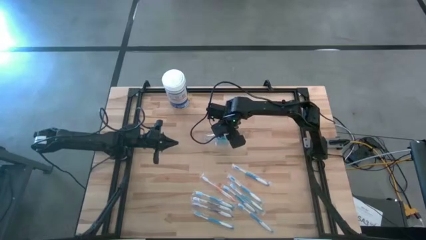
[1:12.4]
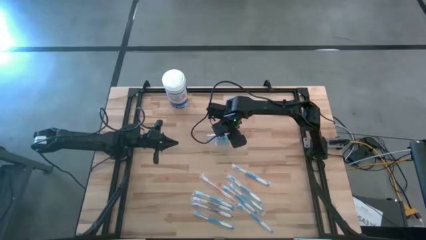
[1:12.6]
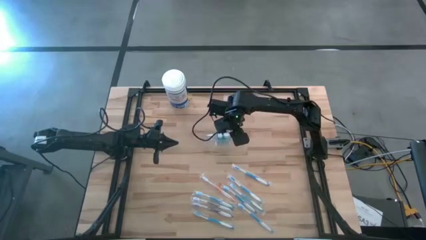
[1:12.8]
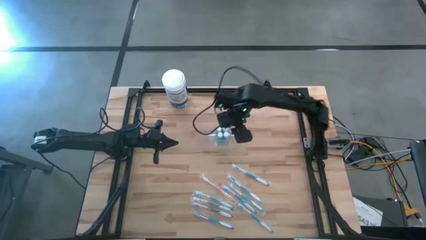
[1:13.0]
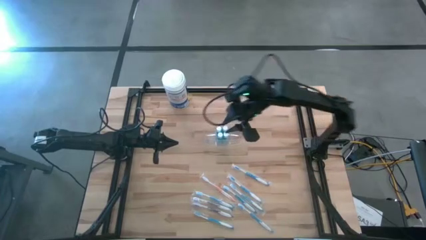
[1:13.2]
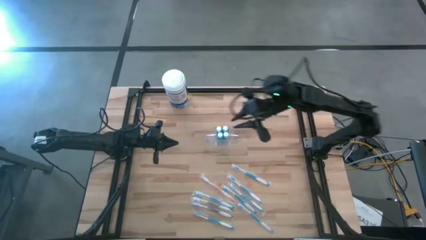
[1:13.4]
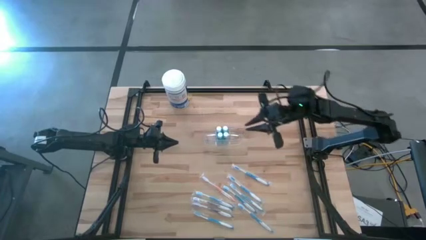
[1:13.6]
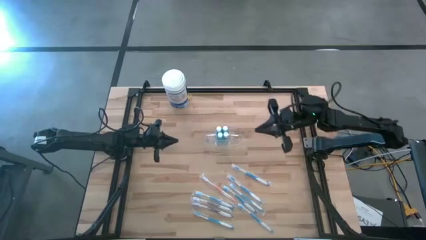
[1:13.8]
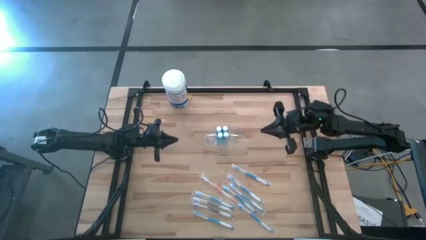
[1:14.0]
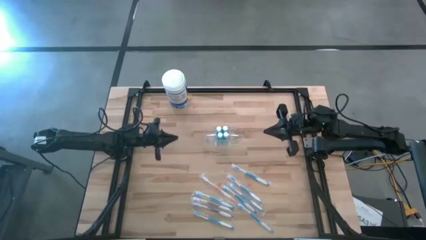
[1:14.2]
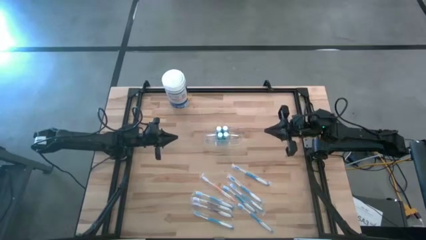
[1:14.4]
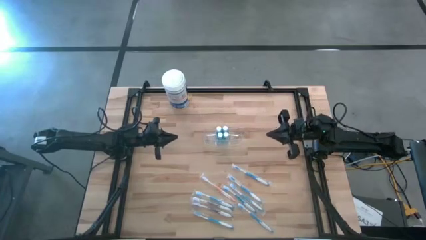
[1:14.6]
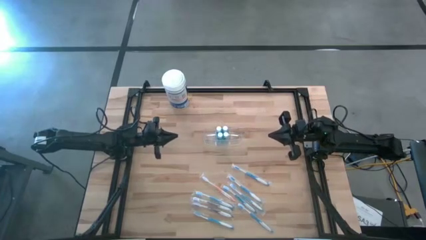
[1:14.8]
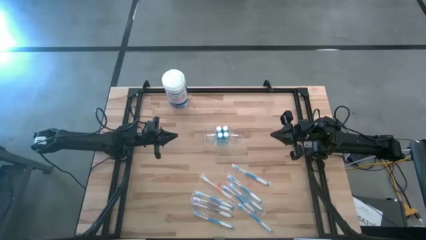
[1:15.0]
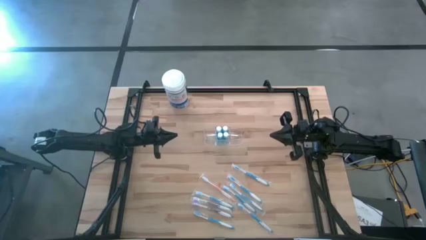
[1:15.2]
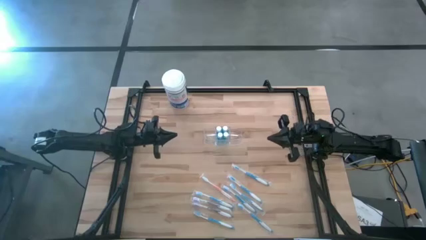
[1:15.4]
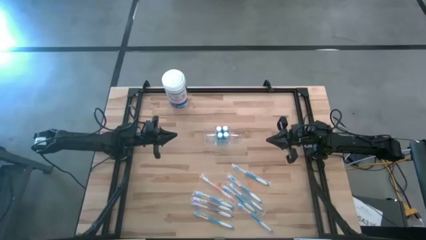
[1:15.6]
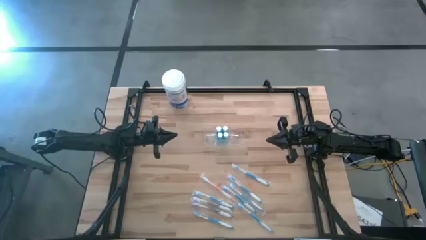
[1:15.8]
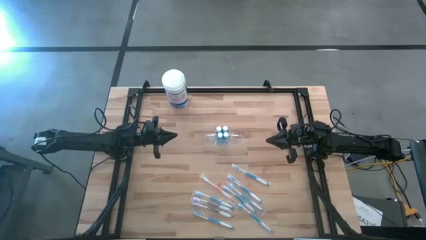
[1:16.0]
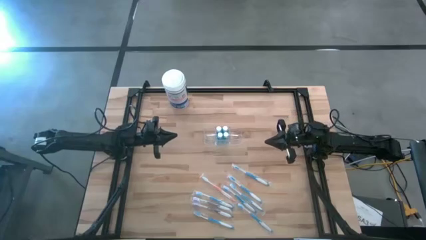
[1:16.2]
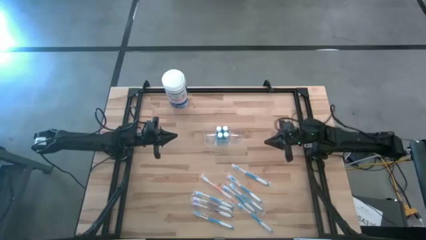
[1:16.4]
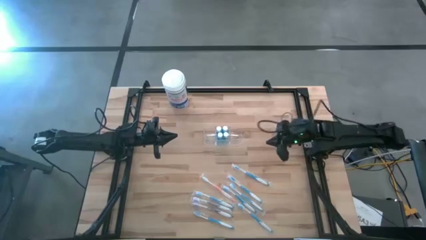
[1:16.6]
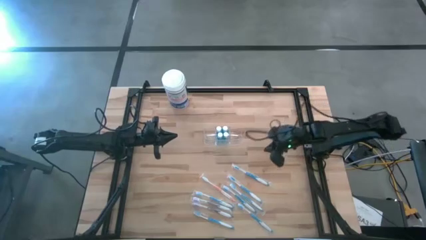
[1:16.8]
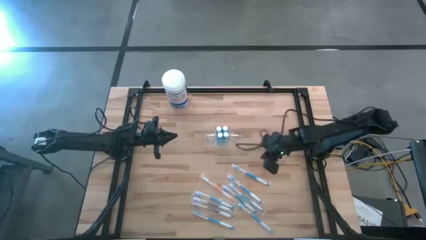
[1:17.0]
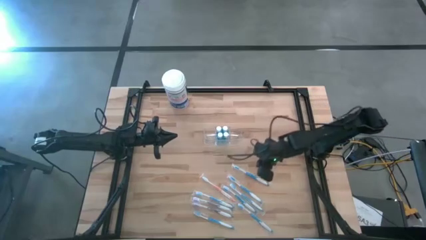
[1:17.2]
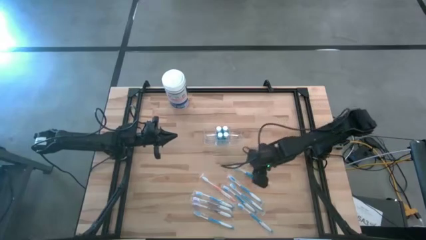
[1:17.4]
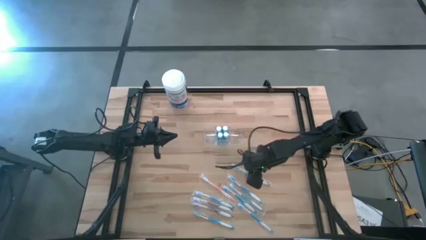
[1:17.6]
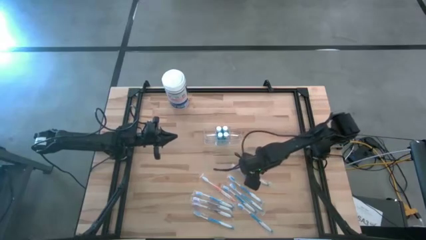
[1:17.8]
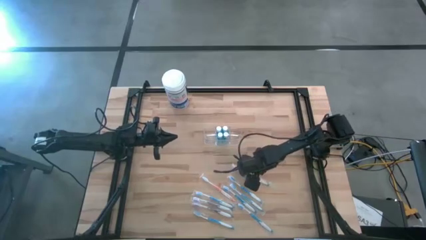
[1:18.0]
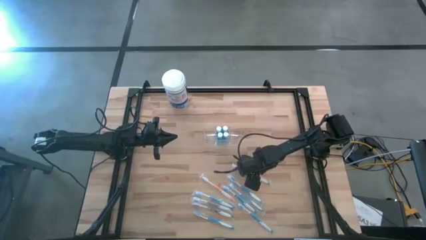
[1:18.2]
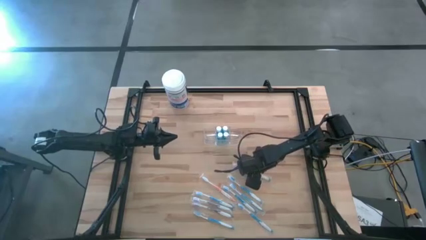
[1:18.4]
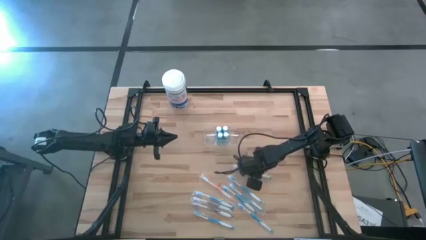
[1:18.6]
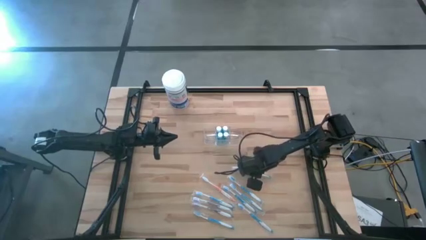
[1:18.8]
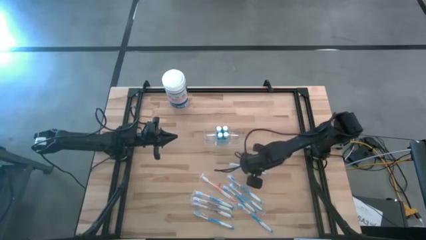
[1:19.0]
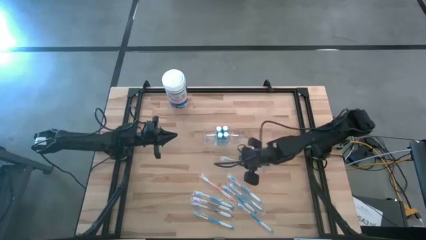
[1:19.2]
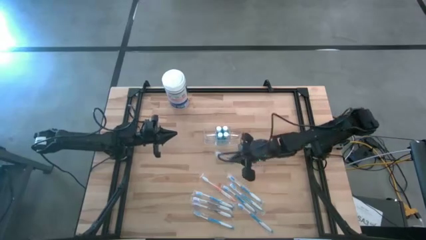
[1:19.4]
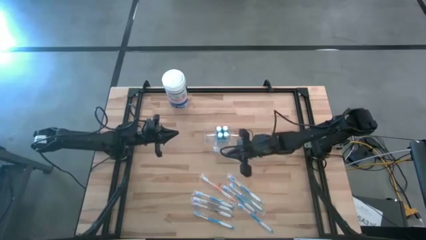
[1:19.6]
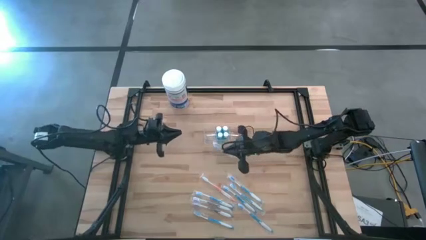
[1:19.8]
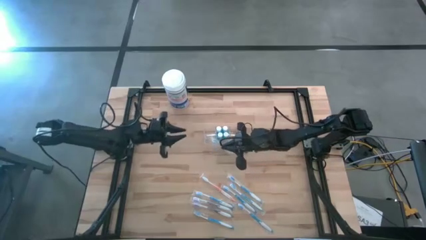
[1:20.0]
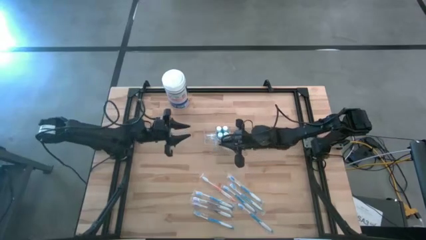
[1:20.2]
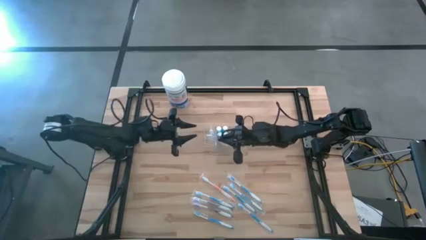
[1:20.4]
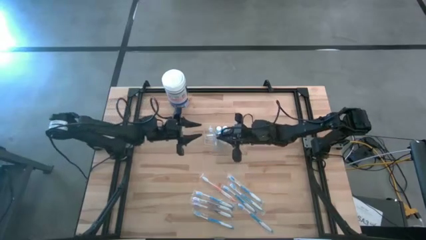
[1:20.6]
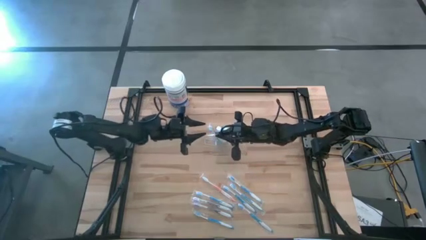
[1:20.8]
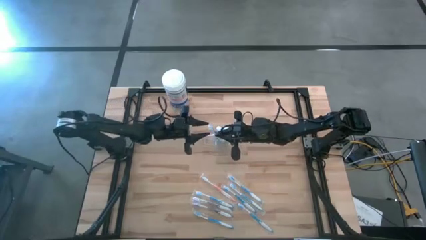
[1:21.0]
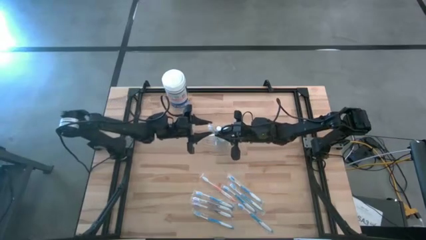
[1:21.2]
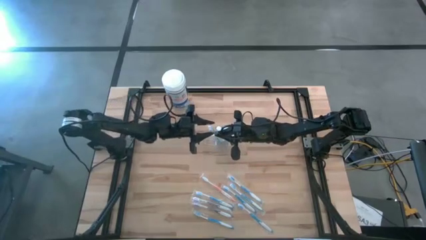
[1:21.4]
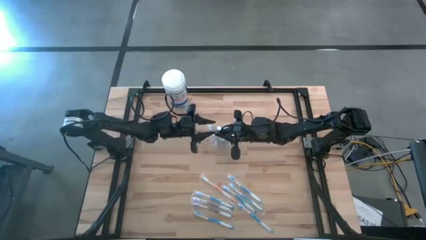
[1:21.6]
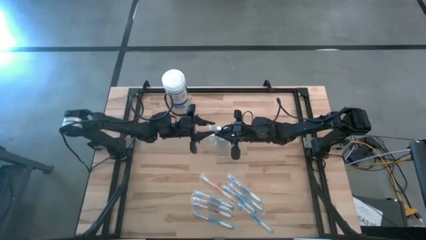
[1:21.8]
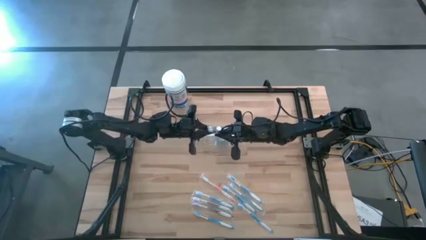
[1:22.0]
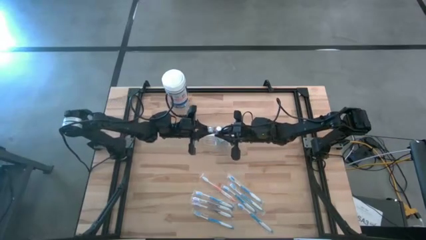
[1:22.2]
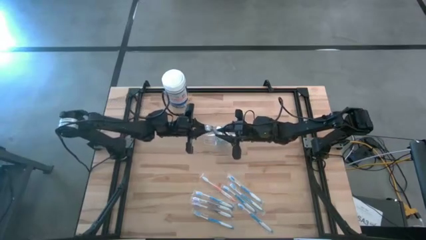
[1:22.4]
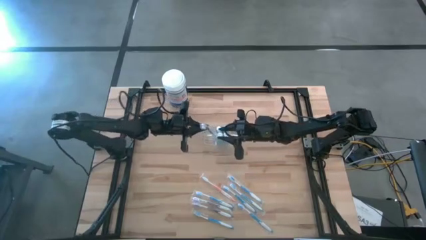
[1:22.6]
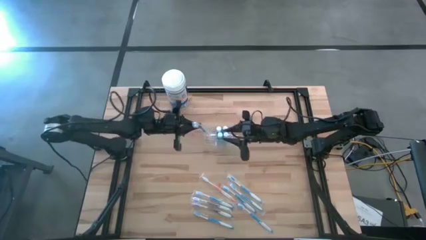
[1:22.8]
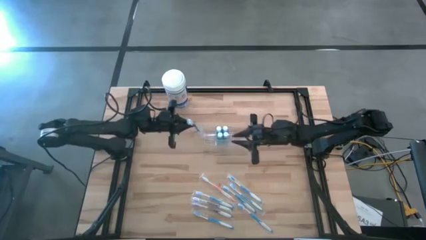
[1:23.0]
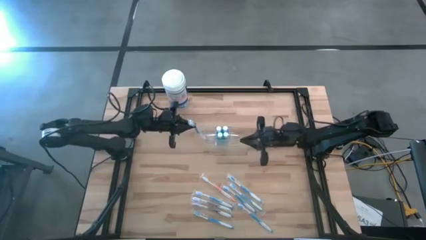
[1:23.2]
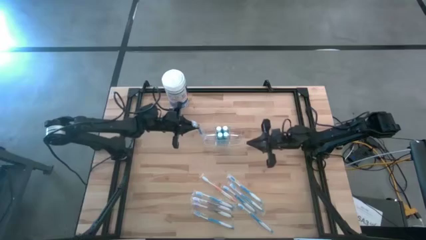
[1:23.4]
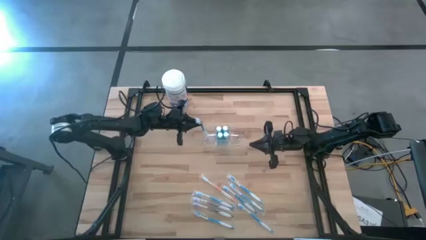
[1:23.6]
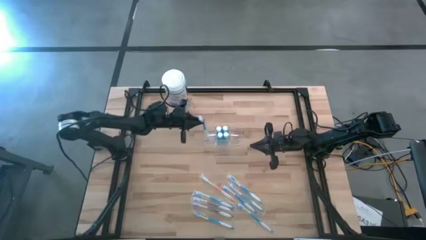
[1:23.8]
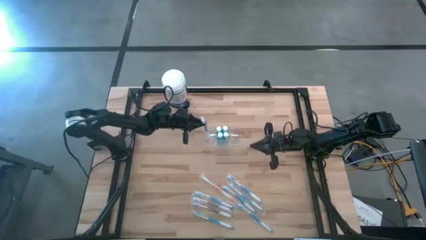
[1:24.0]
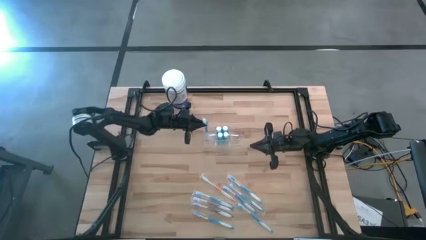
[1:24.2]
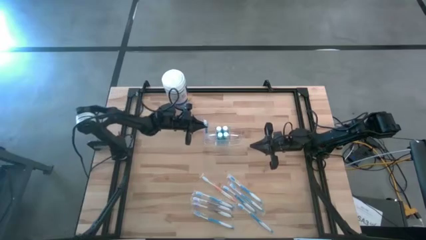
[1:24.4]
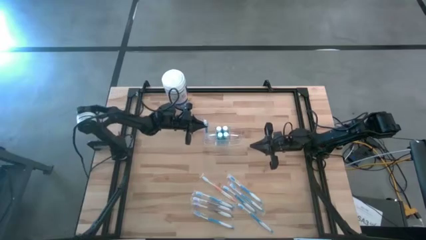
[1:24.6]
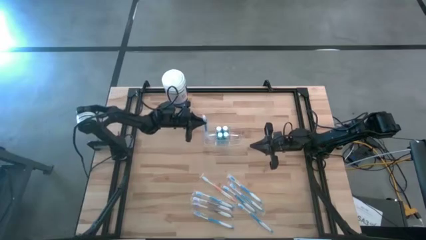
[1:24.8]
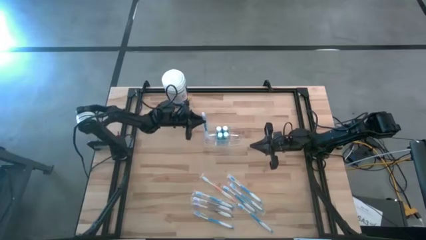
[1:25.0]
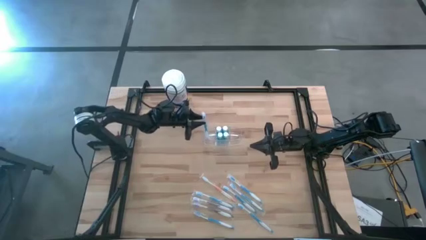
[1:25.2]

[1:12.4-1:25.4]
Task: Pick & Place toothbrushing station
Put the blue toothbrush in the transparent organizer

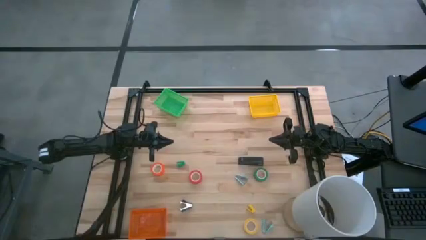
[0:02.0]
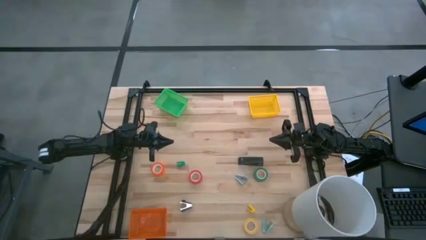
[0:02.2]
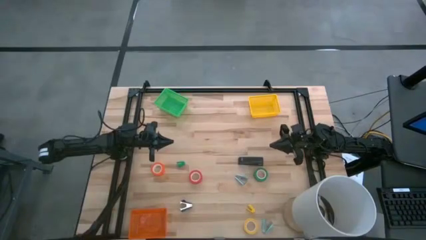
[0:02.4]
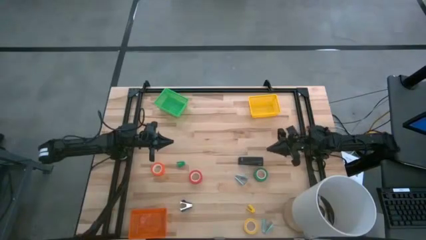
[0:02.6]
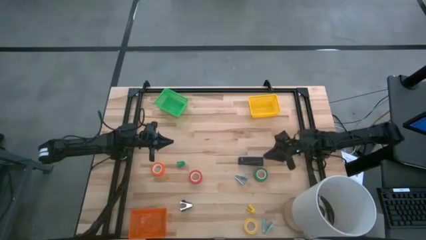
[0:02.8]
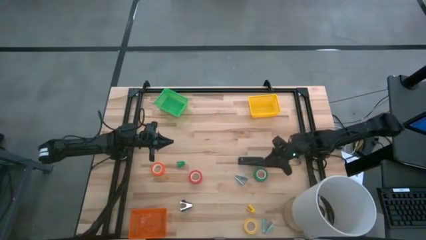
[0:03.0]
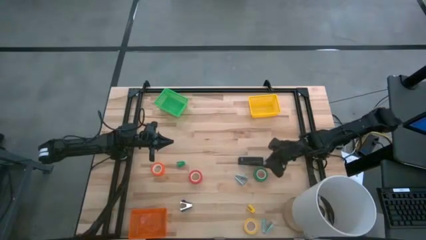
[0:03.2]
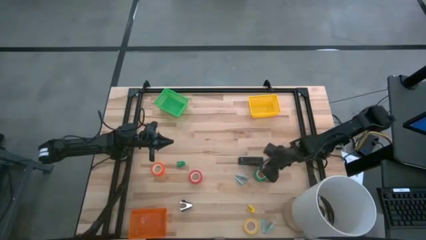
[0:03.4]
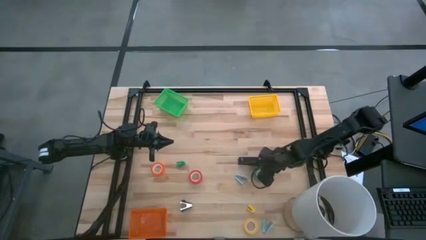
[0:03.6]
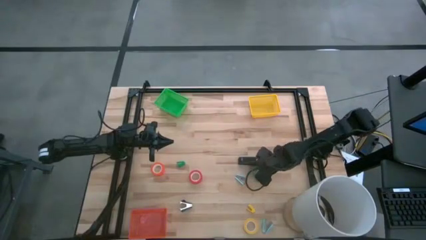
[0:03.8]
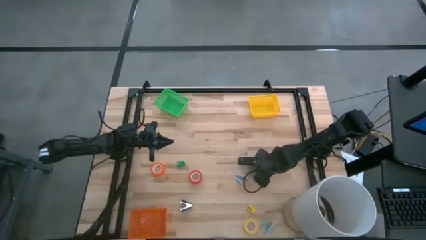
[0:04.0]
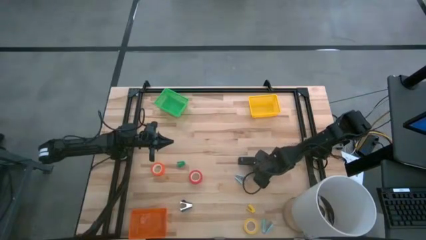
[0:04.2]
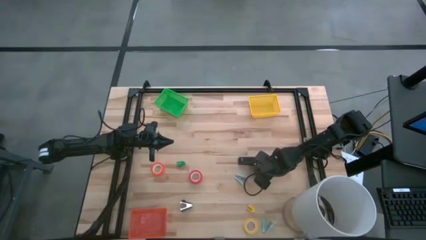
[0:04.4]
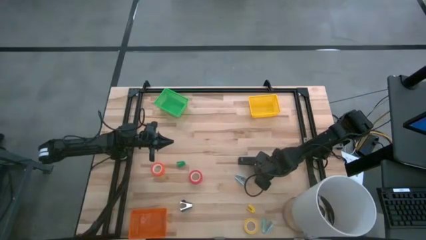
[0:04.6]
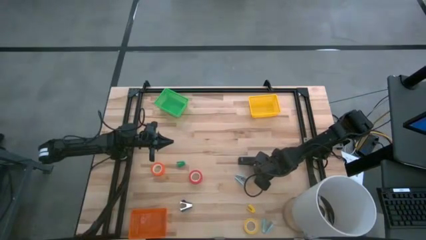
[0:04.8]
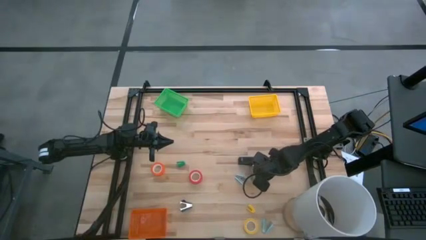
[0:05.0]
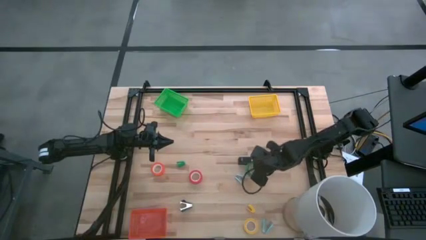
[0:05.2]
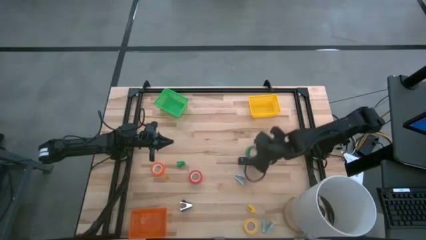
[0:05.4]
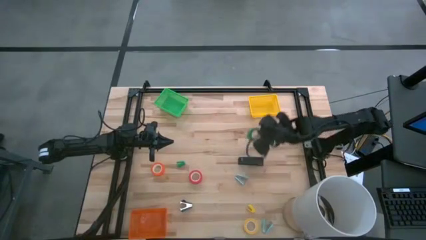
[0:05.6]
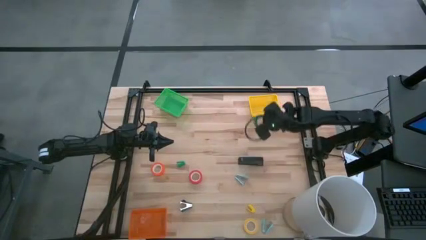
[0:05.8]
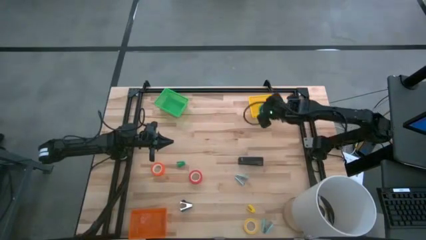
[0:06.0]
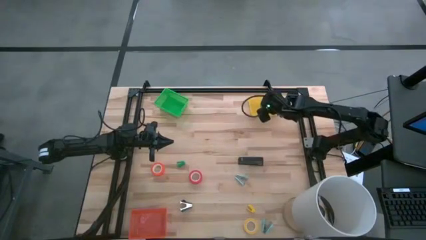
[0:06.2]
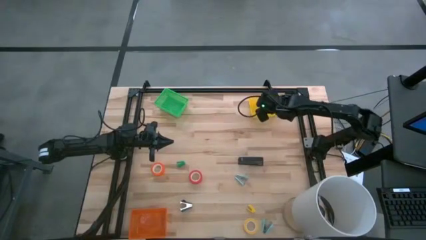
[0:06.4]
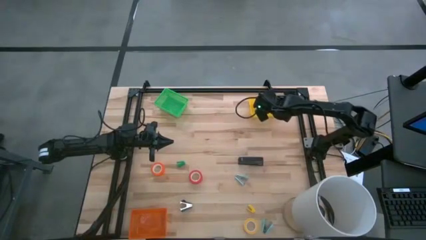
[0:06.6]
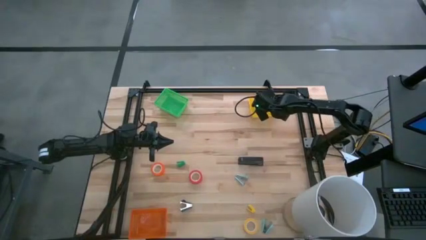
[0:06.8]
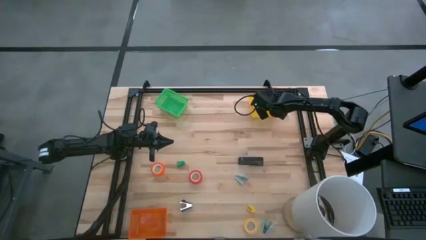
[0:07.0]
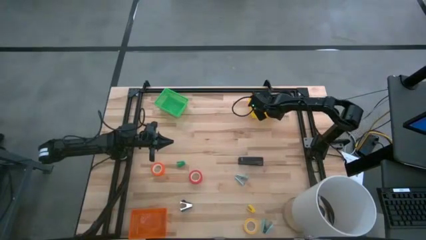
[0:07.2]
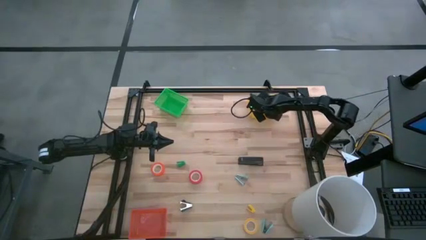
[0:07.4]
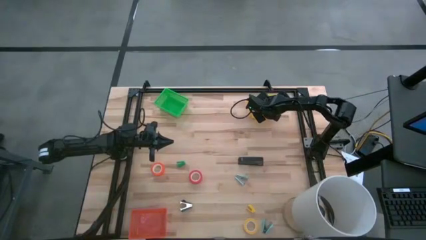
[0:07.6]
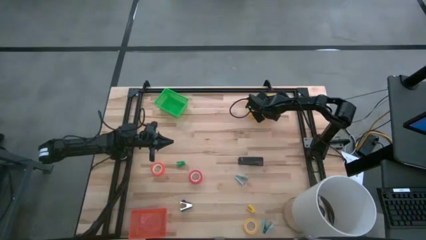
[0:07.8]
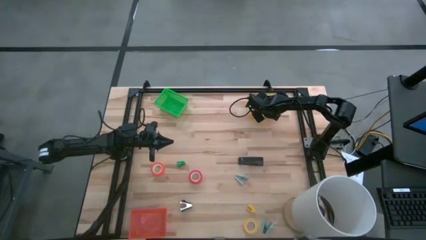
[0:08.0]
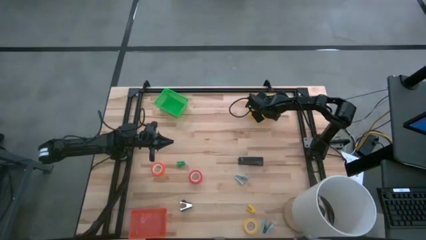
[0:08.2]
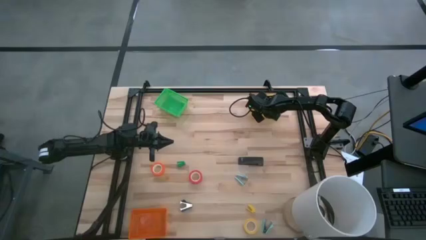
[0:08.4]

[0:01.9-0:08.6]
Task: Pick and place Stapler, Stapler remover, tape
Put the green tape into the yellow bin
